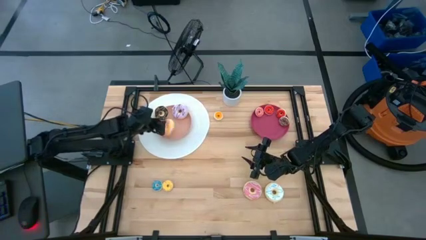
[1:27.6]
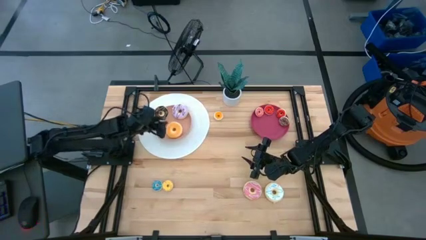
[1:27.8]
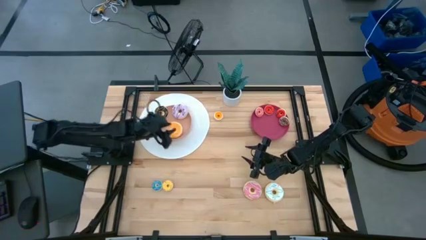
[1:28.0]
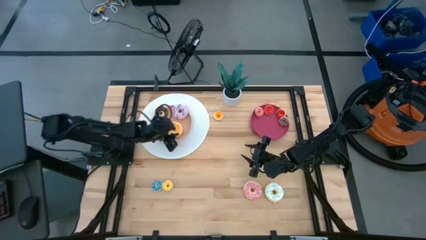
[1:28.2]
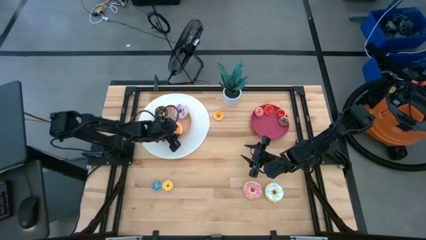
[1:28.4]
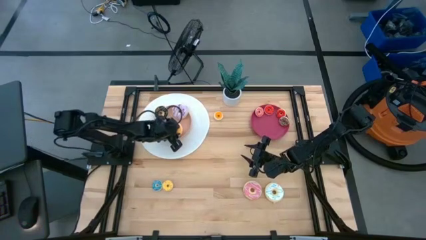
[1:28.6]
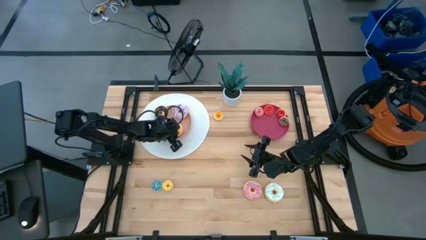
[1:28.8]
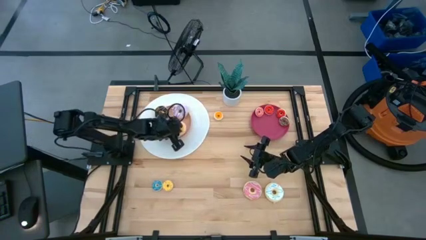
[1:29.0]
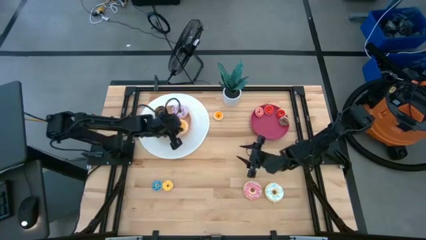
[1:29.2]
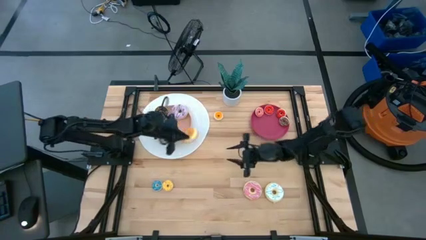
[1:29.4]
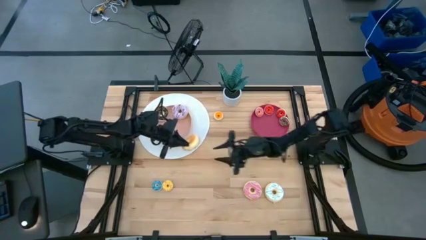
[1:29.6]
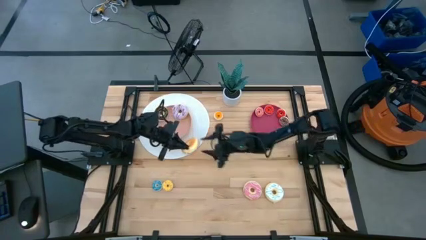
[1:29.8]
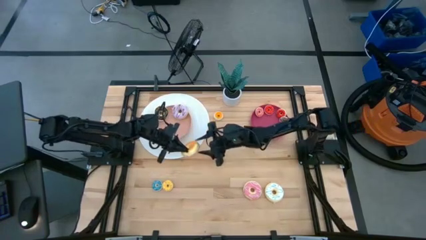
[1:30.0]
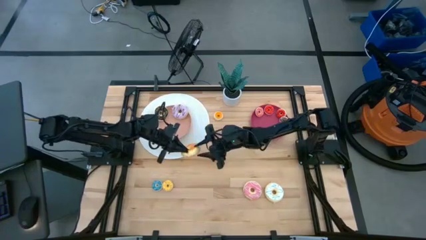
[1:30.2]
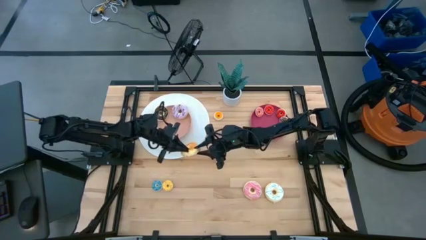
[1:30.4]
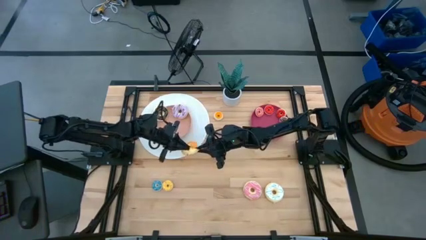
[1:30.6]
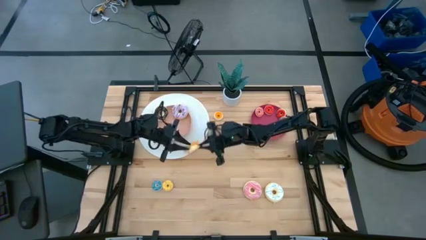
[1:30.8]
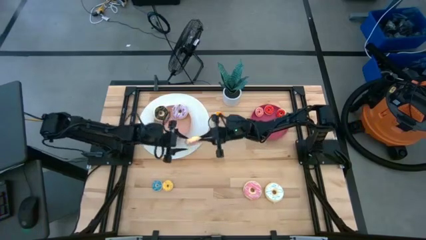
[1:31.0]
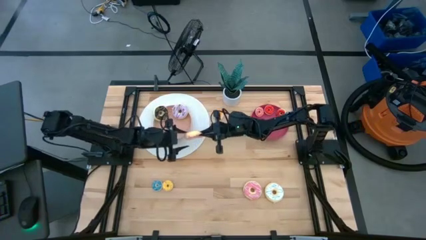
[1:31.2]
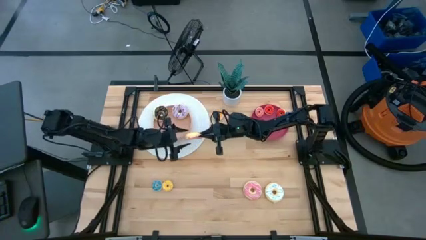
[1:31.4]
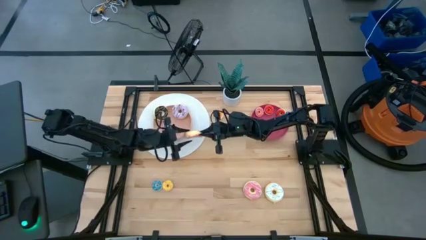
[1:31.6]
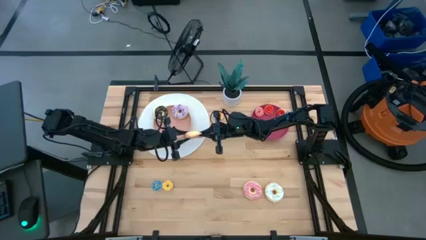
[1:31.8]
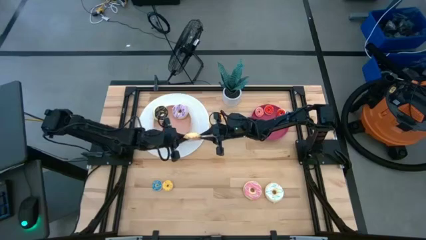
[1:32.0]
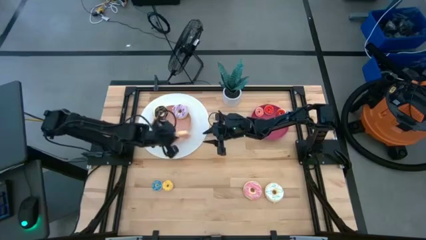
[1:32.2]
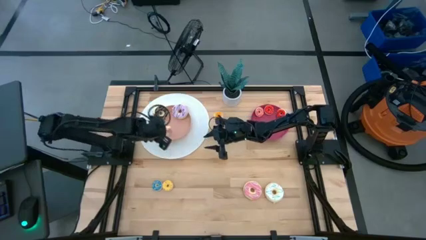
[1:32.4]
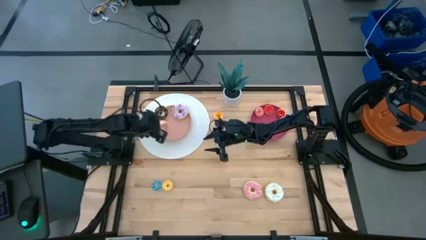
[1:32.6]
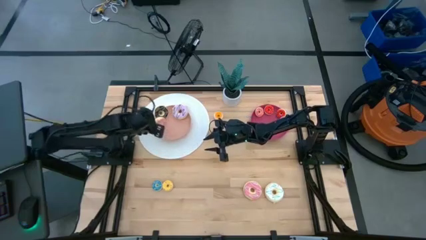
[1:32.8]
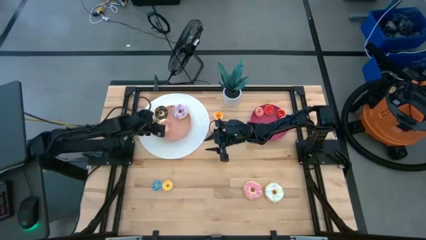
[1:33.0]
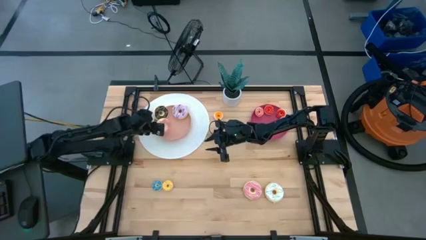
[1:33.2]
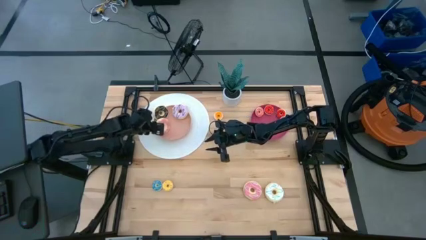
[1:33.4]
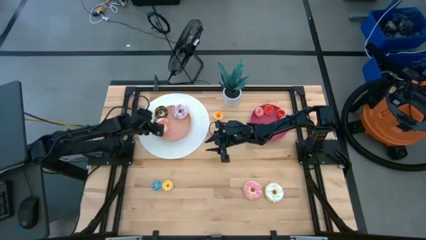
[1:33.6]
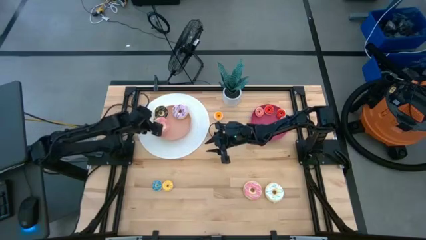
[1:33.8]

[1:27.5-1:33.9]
Task: Pick & Place donuts
Put the top large pink donut on the pink plate

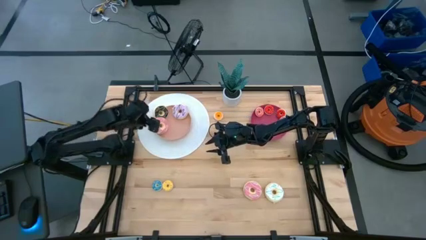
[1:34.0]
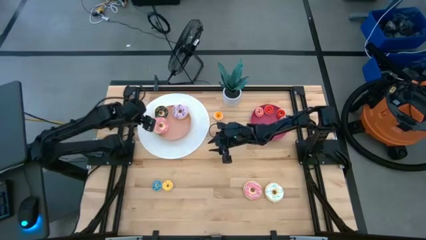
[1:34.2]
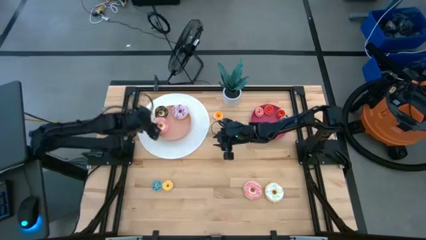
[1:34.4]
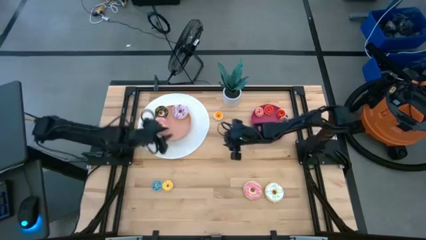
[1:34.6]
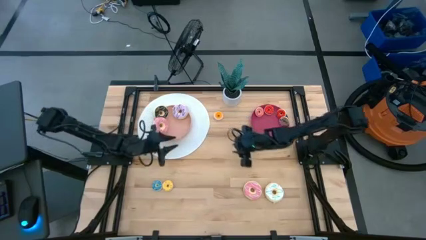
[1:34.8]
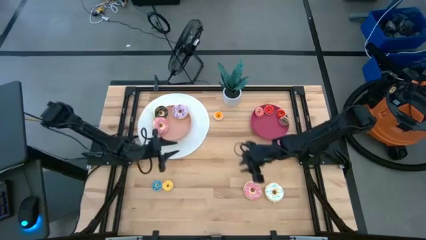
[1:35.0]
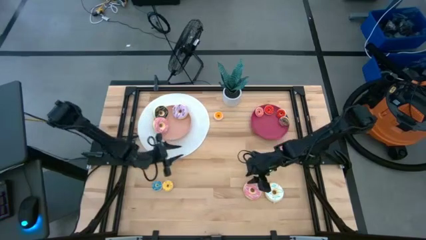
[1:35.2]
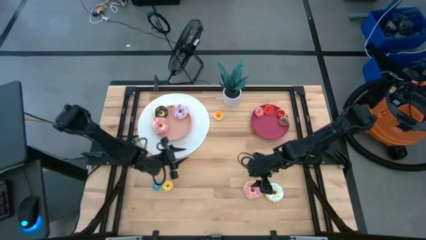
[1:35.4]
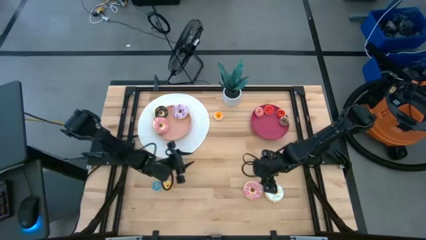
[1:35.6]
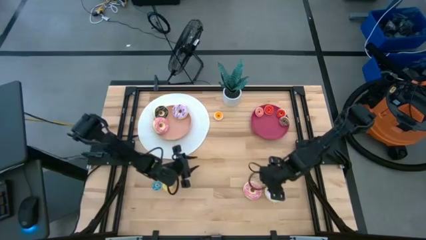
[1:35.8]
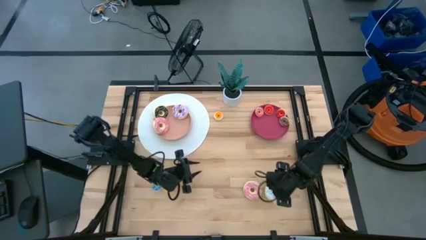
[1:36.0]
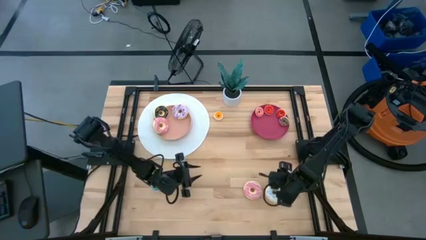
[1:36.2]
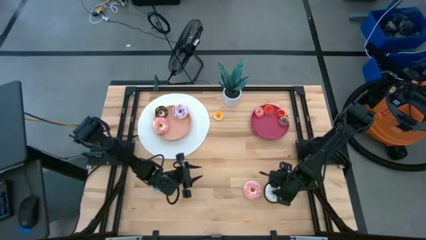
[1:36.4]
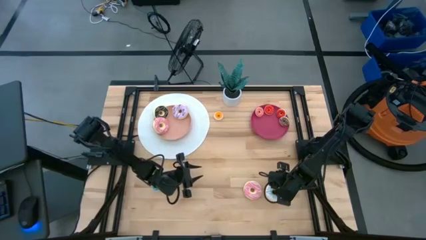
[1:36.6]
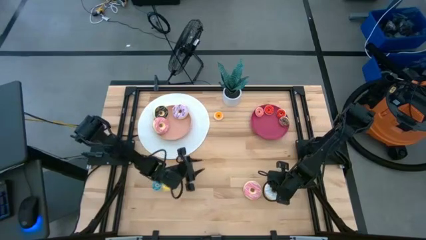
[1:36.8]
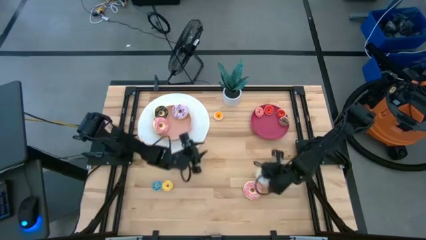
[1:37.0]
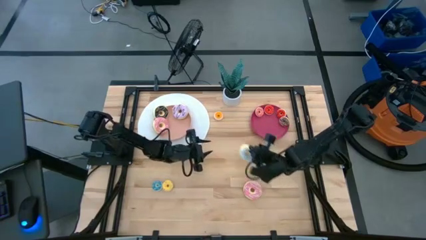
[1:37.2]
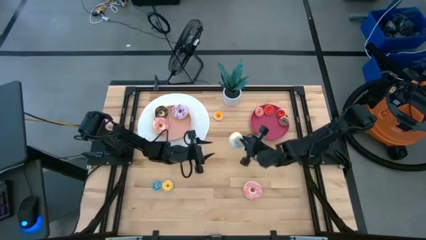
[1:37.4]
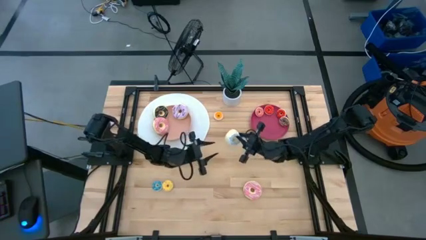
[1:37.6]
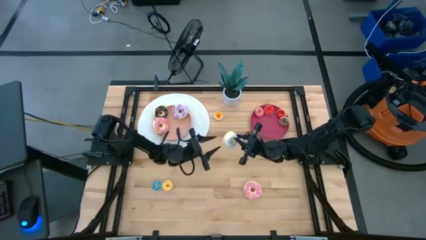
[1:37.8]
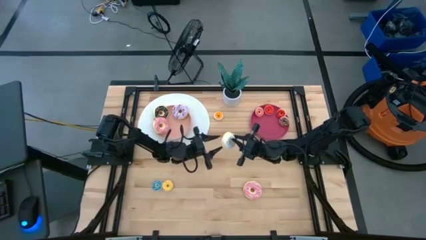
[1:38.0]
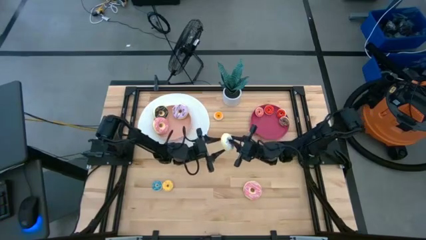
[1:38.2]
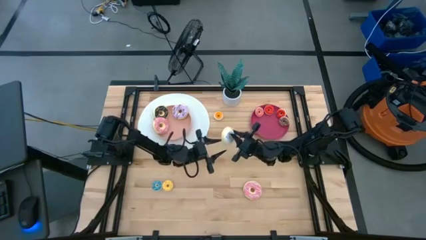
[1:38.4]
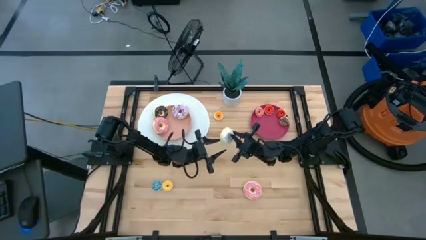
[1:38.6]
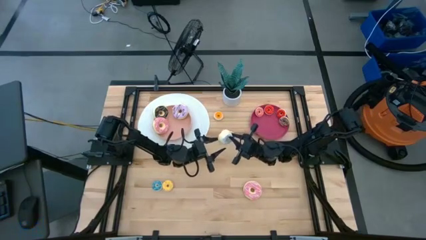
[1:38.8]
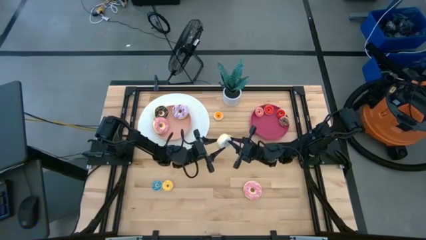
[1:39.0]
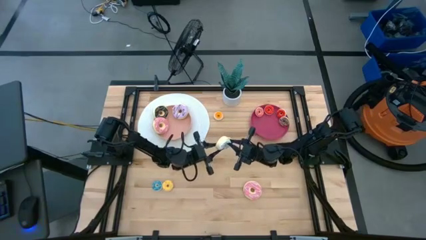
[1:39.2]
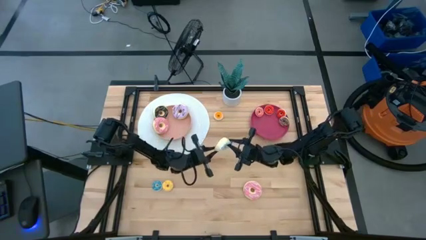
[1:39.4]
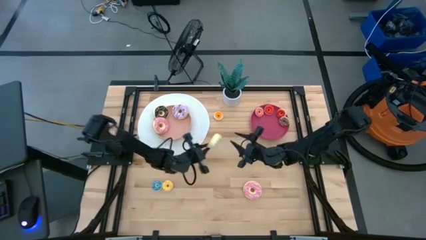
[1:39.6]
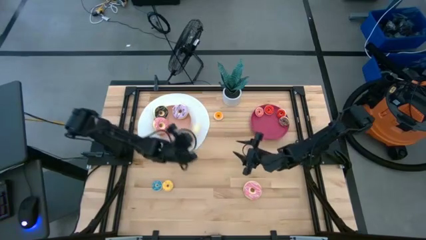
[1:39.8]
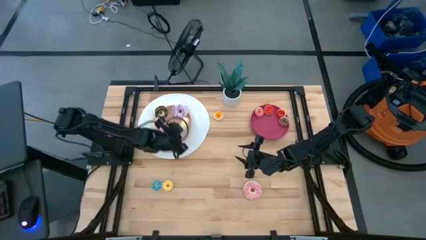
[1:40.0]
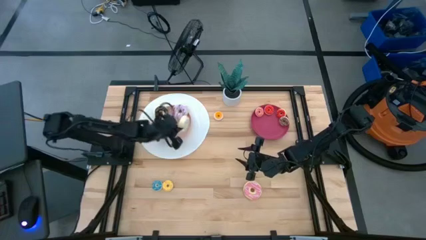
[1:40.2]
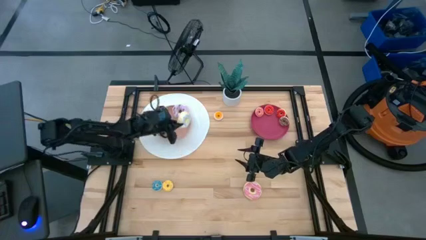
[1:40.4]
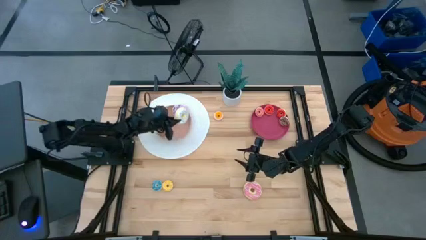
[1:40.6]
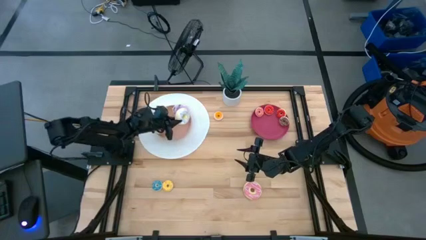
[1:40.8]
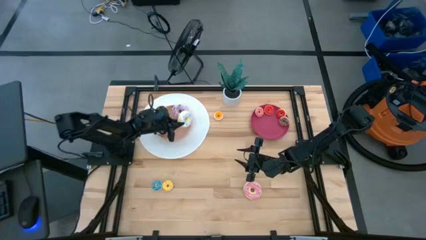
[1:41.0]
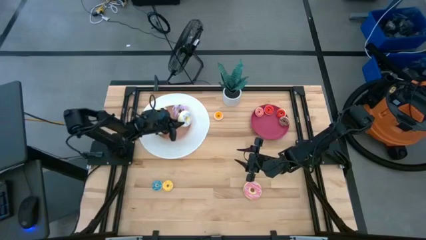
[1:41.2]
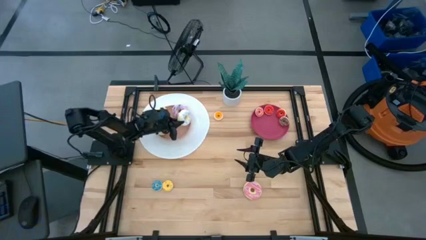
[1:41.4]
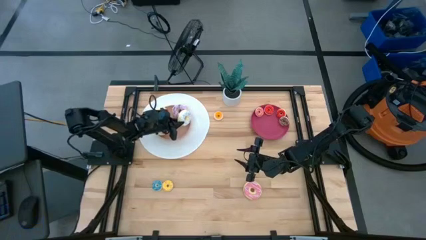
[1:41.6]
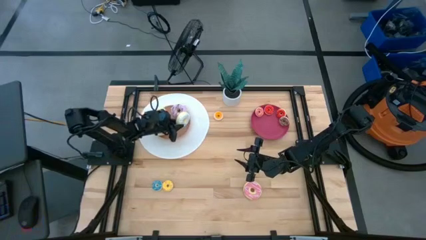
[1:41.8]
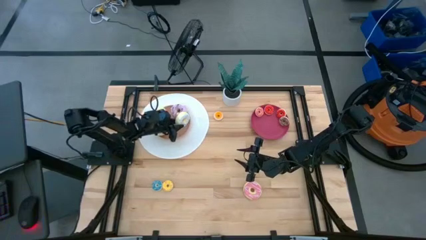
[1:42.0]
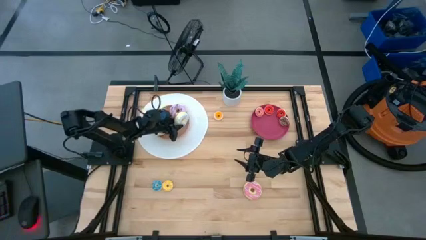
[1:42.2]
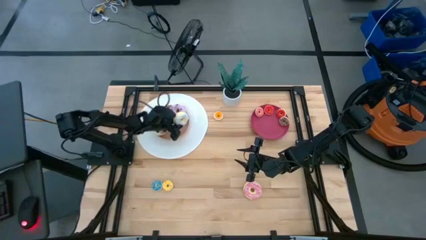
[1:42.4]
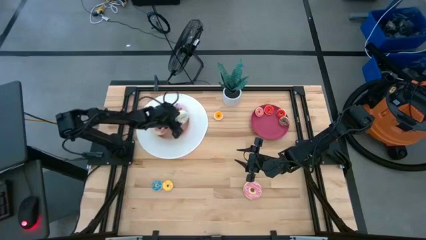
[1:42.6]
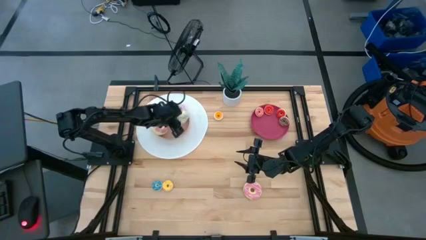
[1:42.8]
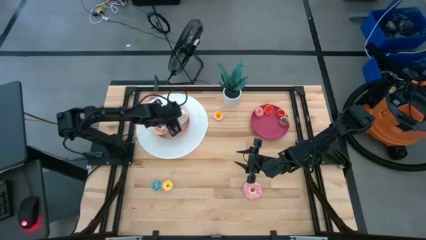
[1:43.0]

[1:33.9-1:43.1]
Put the large white donut on the pink plate
